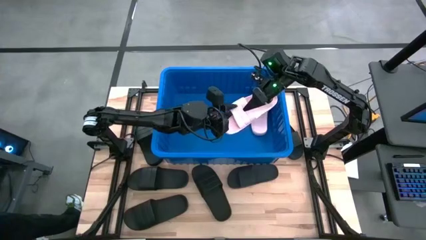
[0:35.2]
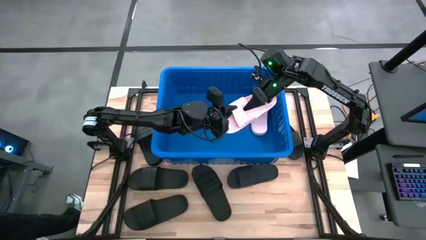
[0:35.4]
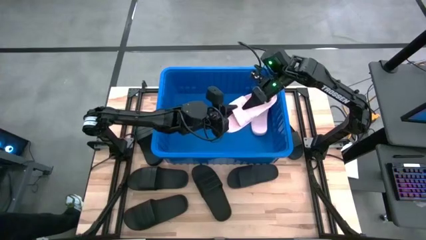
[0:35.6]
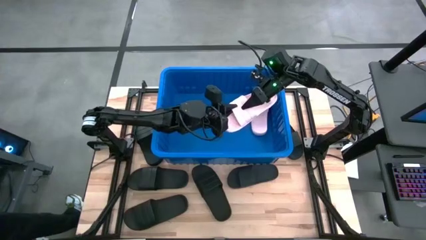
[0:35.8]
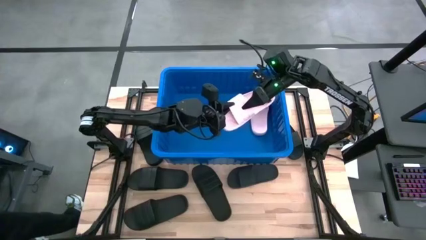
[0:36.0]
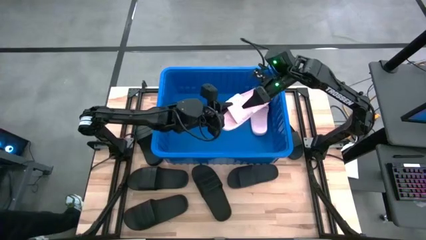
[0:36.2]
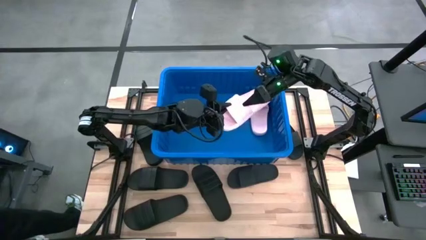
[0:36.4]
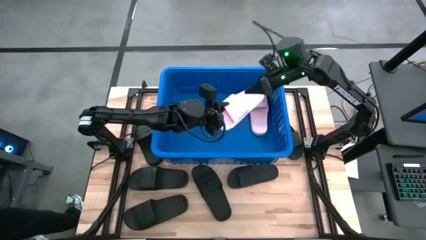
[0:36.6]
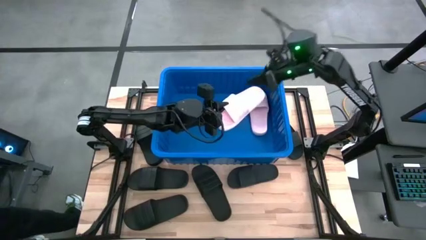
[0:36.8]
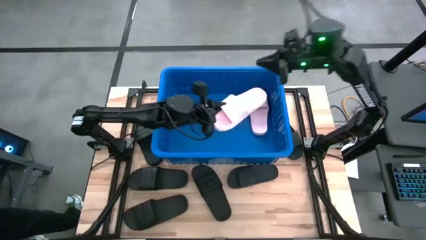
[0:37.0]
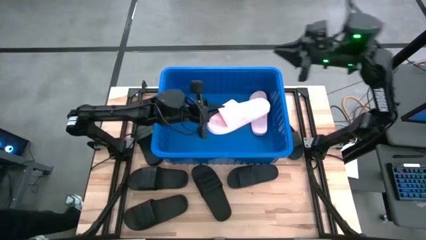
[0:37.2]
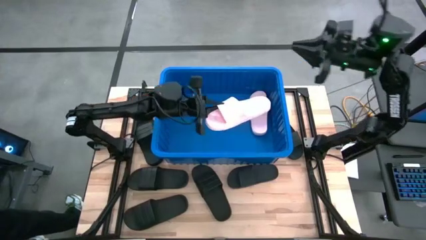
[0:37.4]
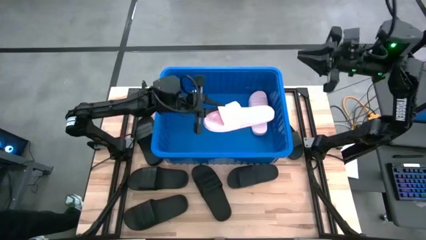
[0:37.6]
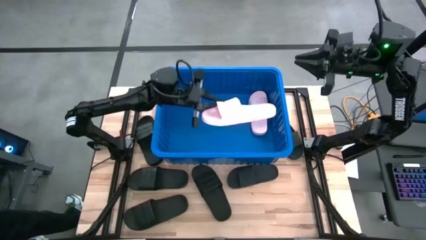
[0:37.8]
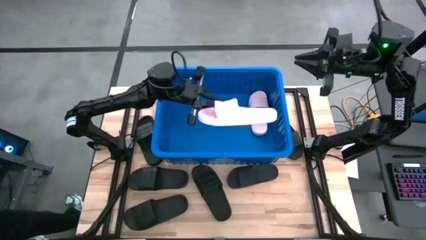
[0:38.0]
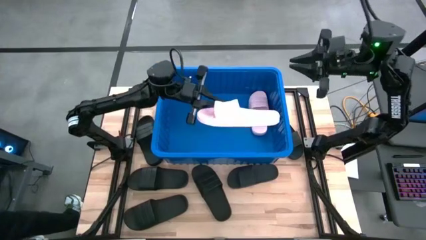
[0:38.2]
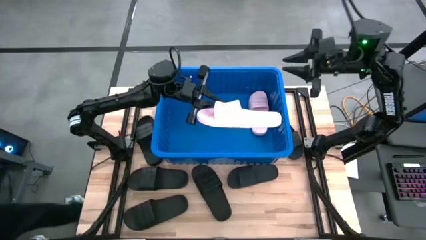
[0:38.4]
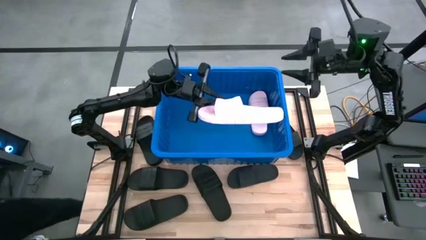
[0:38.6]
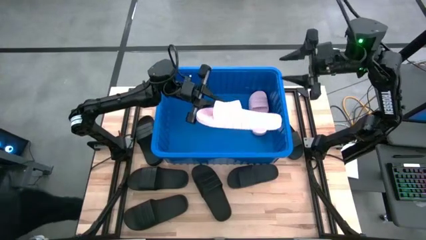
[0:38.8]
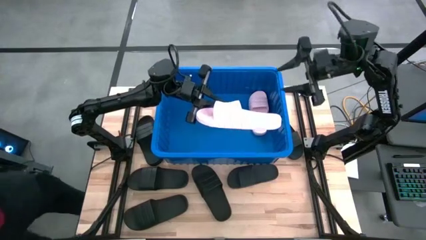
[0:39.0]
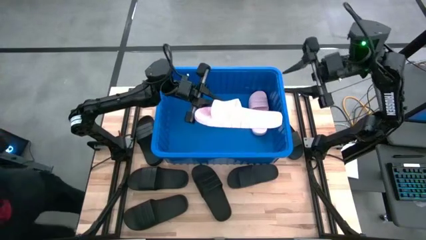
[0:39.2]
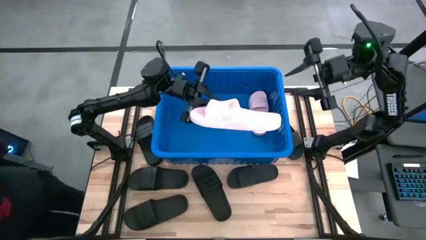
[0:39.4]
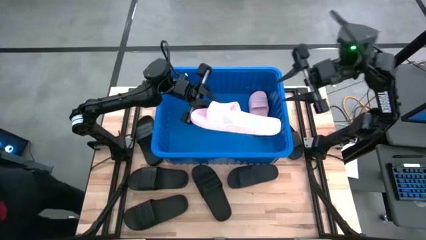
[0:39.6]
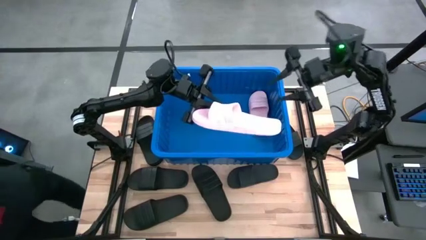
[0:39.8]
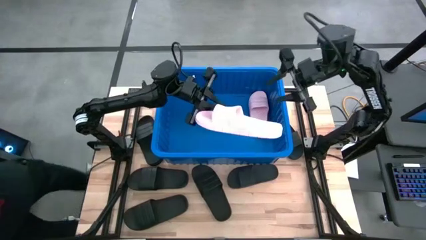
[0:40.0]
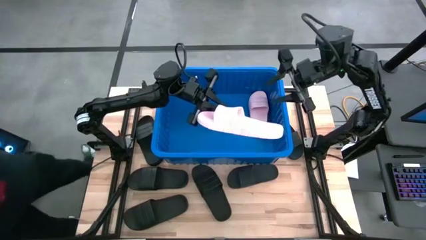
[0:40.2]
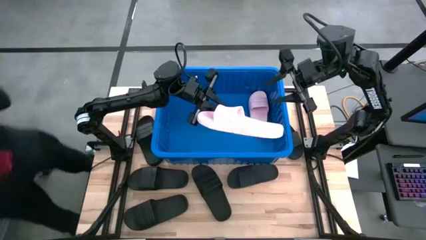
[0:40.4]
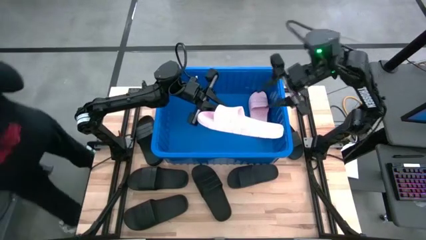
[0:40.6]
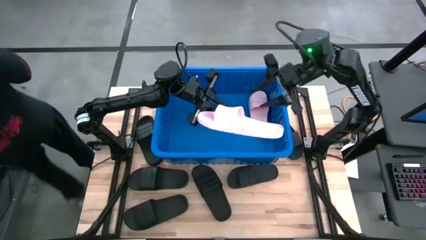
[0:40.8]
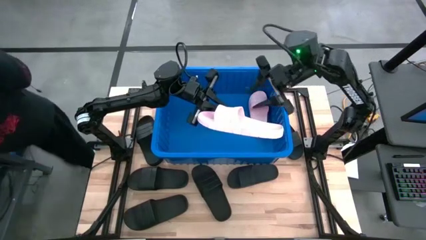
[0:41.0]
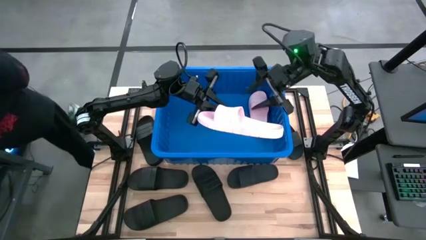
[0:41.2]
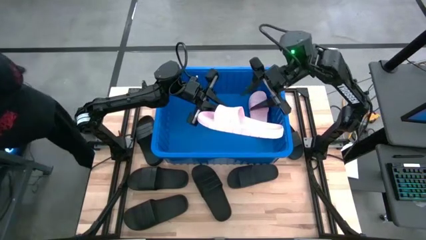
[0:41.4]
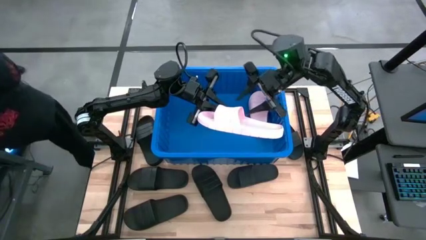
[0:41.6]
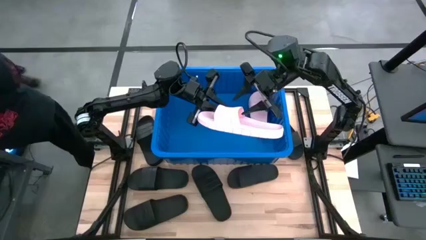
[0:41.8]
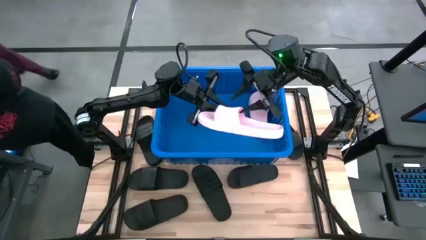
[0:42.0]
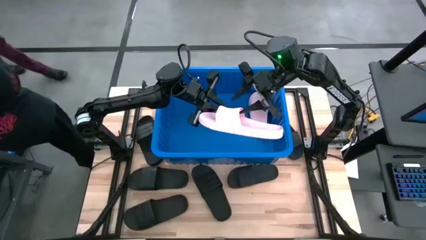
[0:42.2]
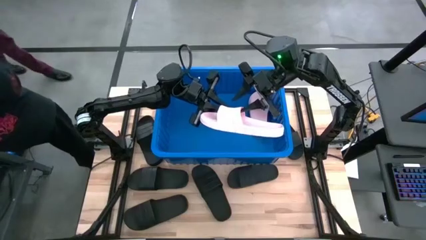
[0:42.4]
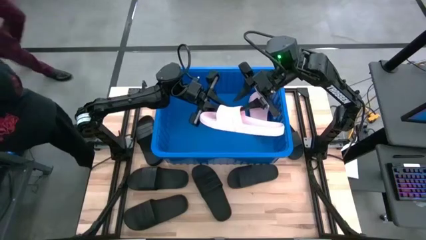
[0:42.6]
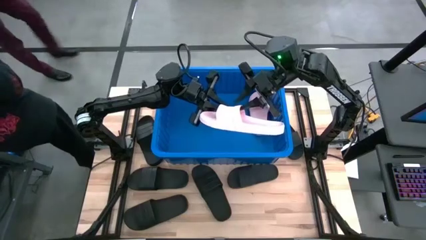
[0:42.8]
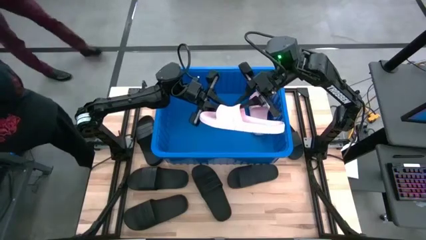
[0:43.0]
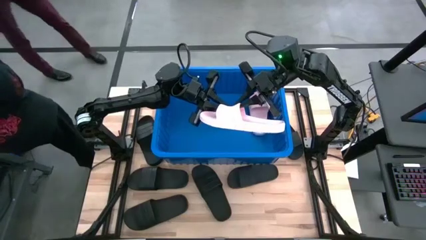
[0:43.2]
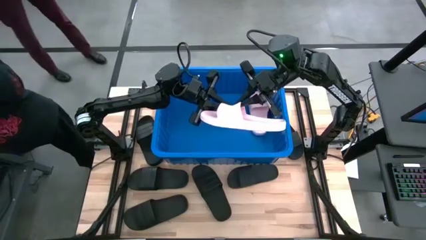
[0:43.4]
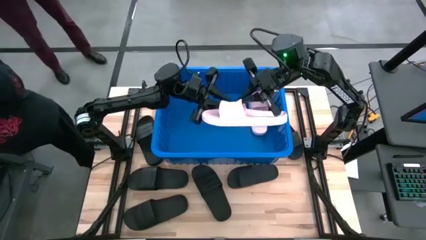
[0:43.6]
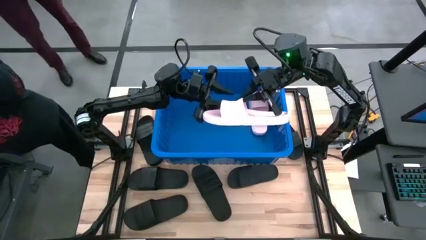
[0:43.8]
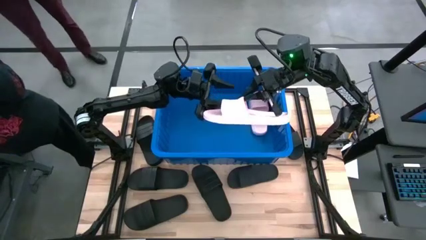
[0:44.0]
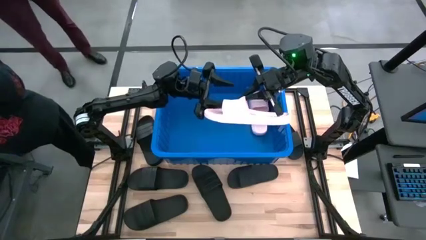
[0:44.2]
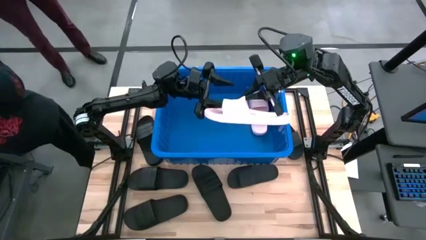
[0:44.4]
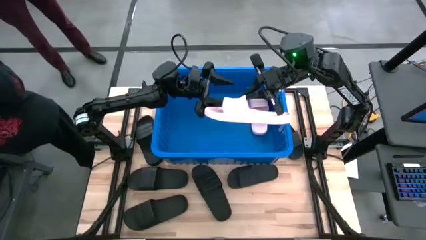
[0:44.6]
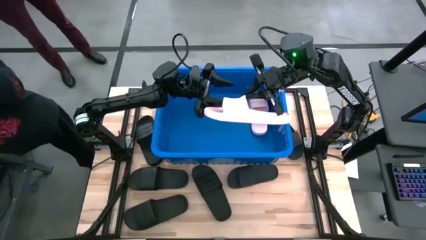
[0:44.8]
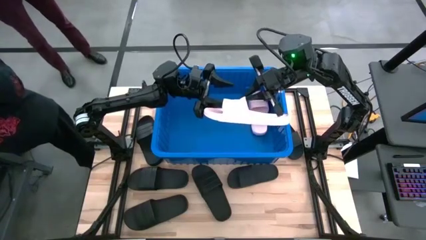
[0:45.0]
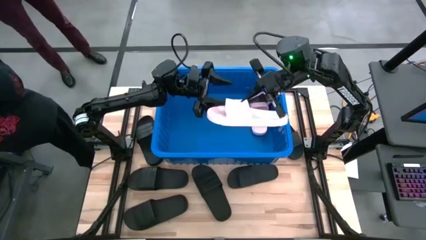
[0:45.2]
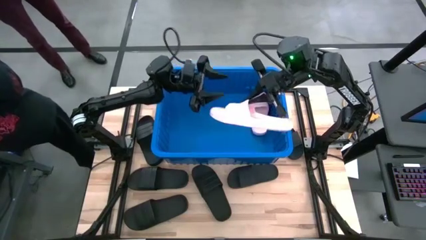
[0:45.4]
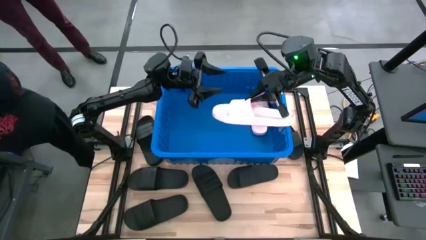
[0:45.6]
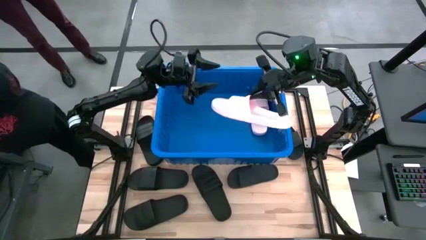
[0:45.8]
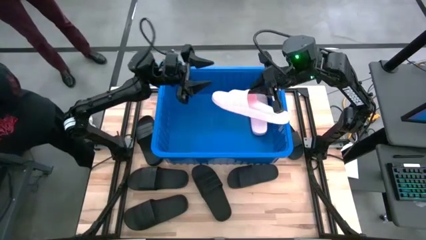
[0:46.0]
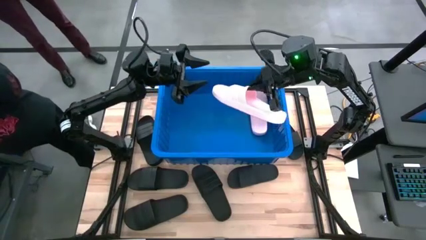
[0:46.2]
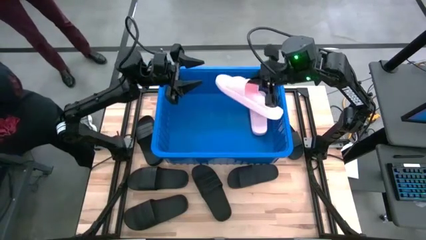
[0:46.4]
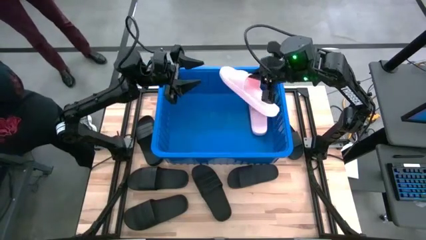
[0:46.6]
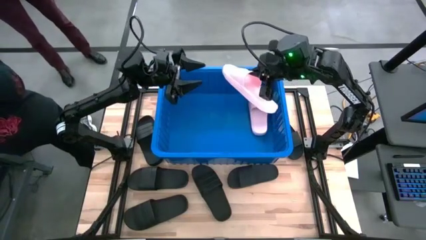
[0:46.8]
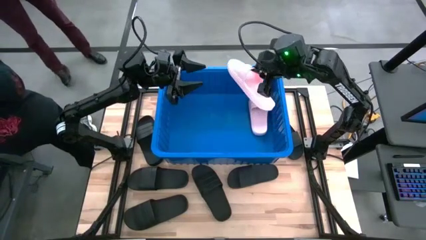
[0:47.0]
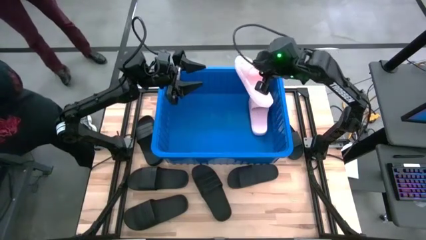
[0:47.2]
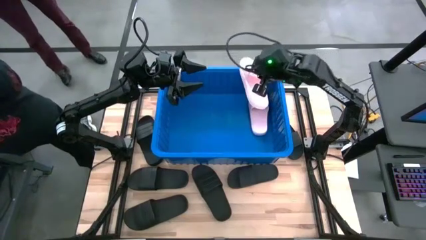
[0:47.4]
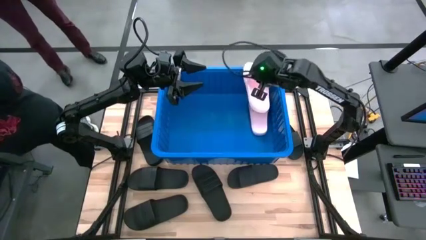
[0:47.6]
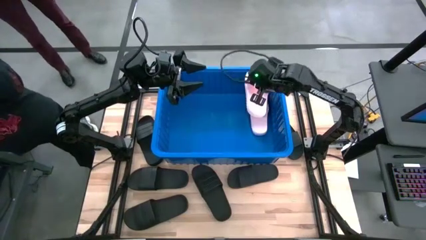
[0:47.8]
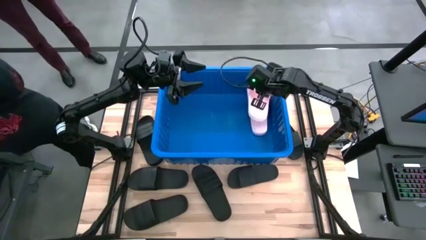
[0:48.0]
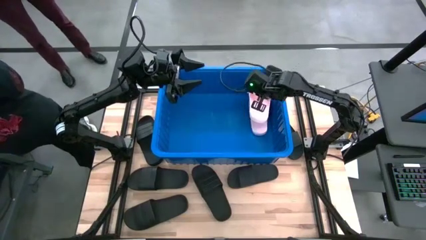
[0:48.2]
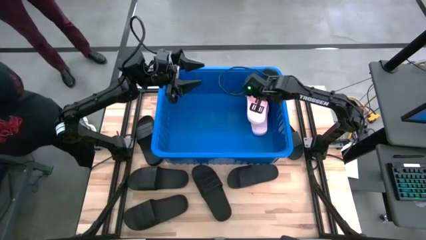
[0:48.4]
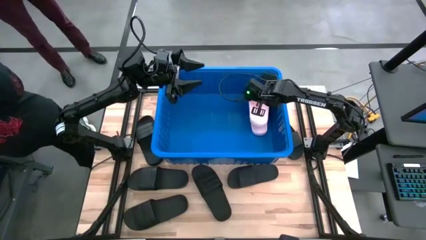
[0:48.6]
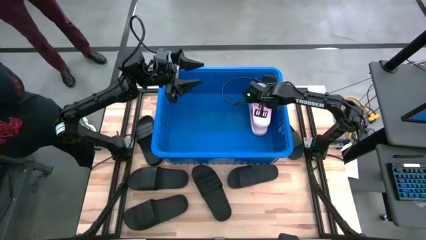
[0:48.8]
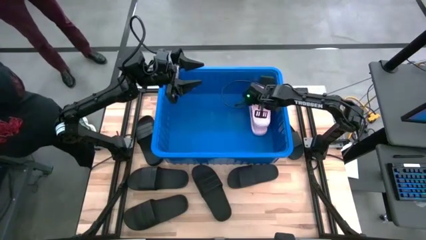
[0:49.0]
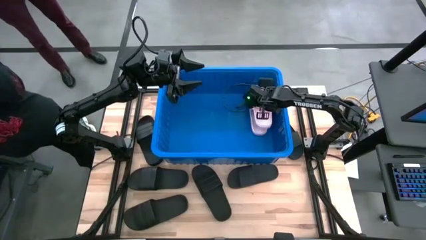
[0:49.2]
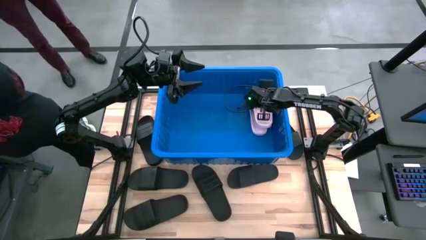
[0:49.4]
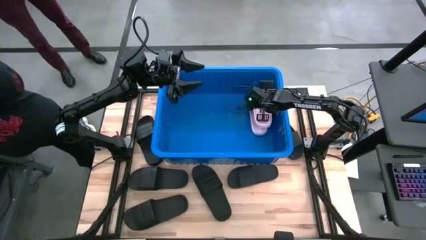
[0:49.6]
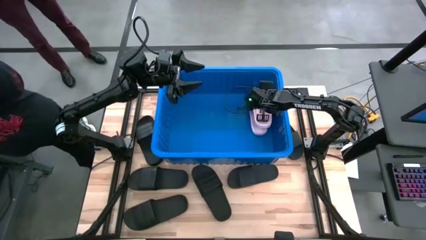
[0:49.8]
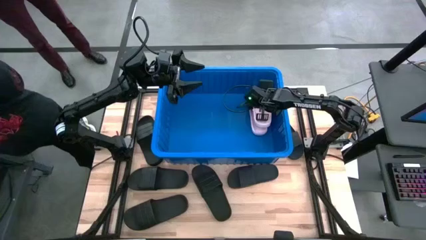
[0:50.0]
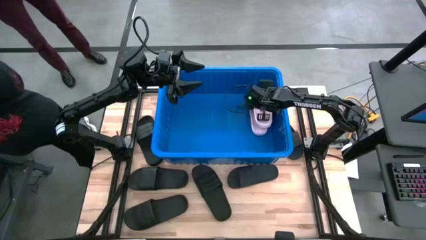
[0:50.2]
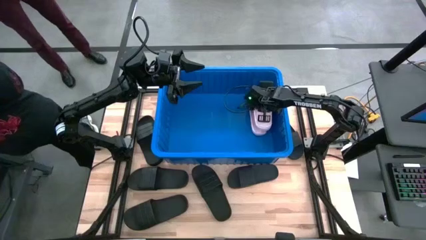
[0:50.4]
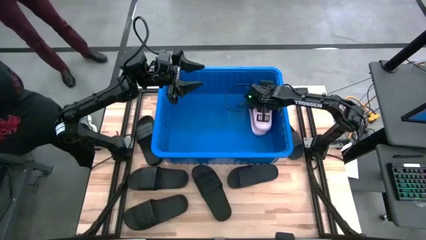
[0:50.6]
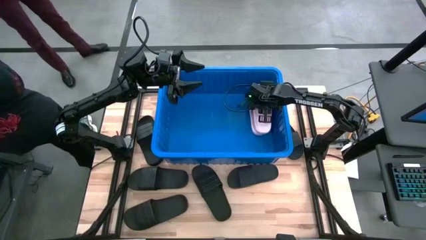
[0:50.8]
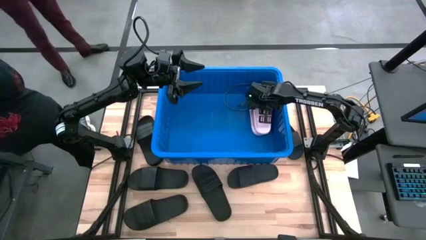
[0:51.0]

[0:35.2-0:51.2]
Task: Pick and place slides into bin
Stack the pink slide on top of the pink slide into the blue bin
